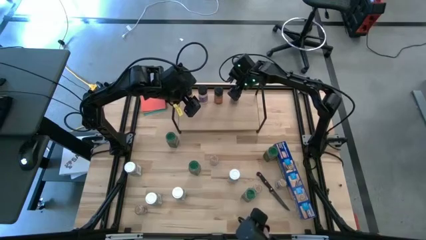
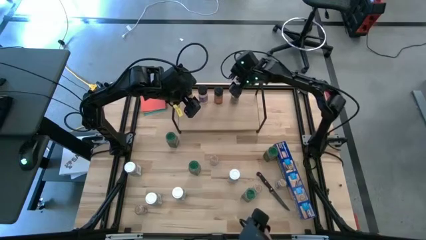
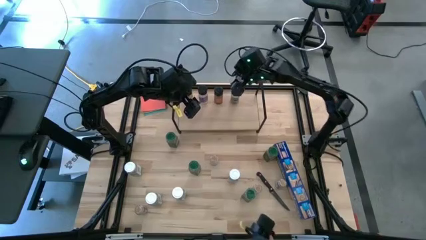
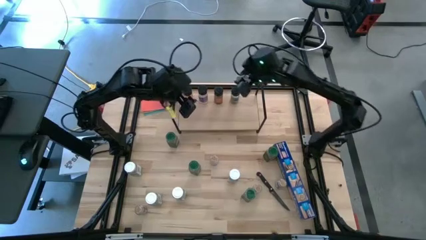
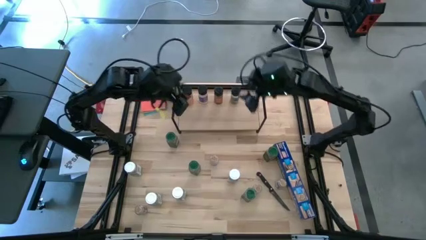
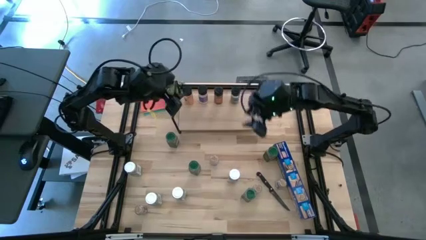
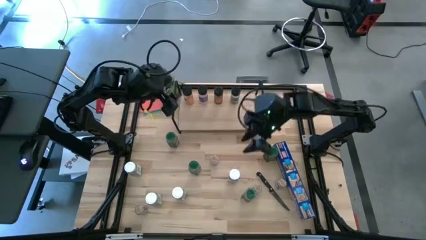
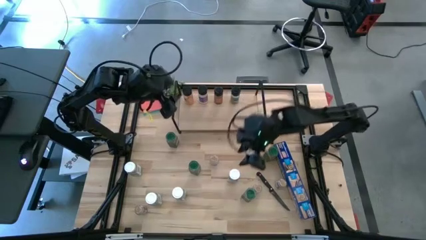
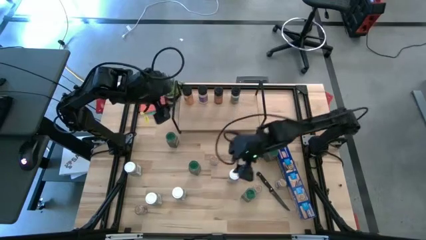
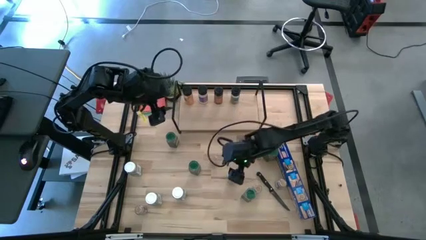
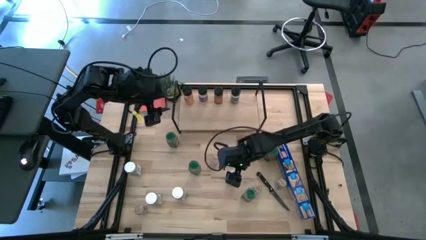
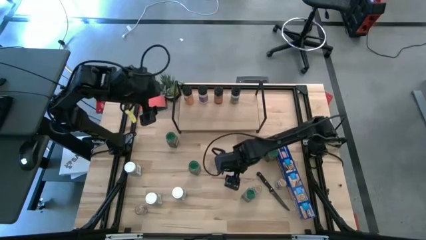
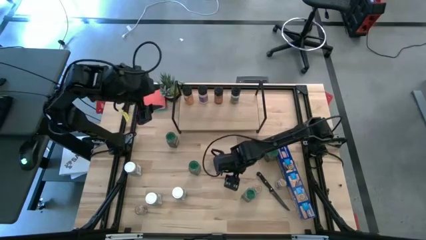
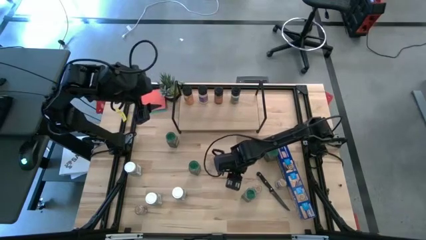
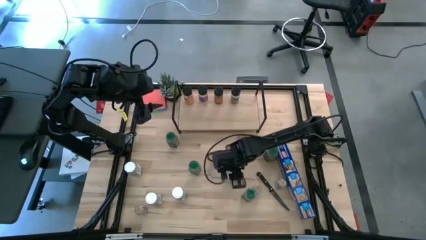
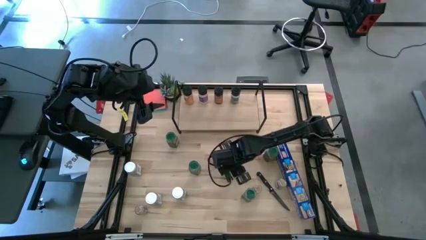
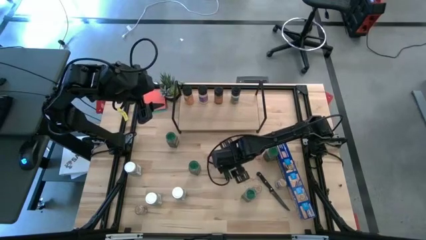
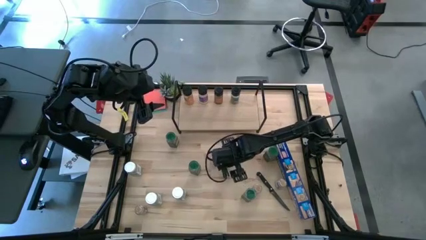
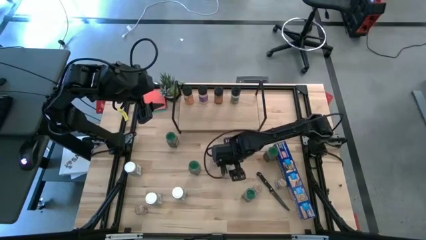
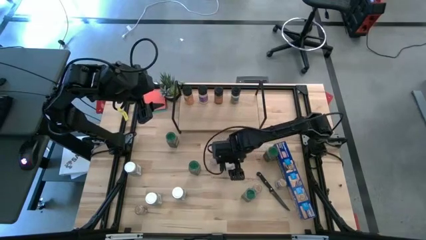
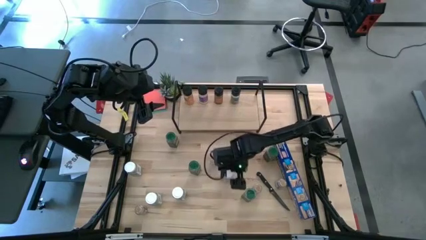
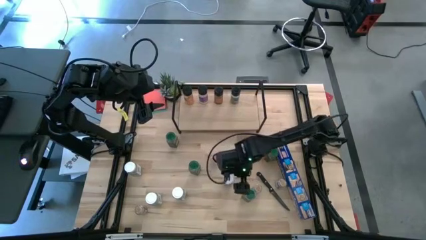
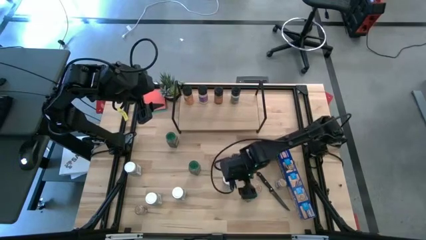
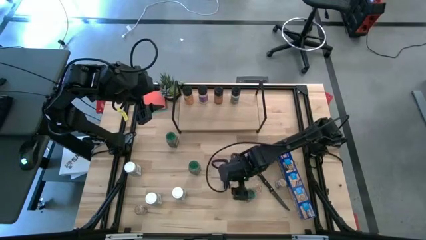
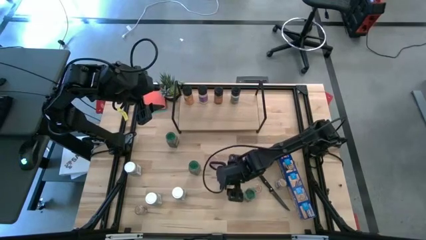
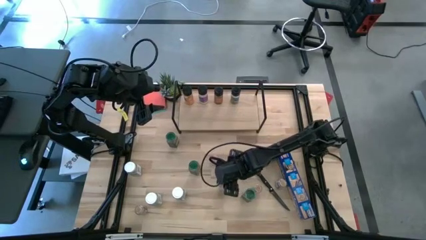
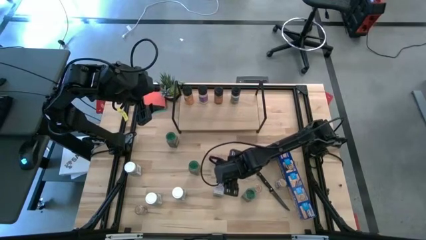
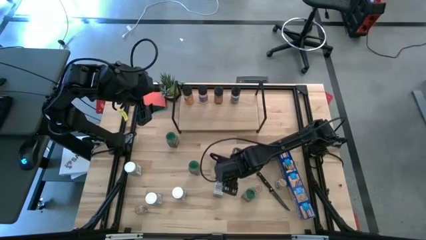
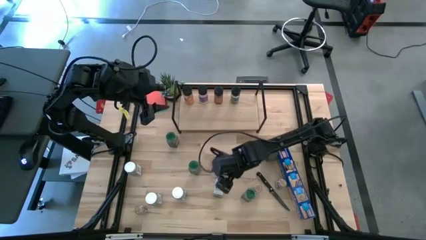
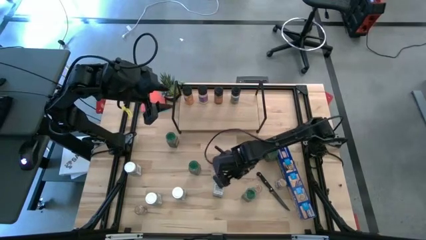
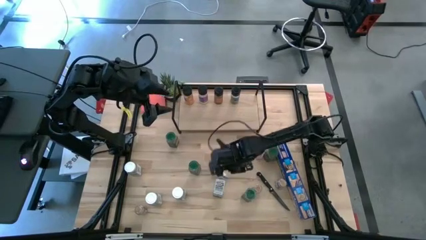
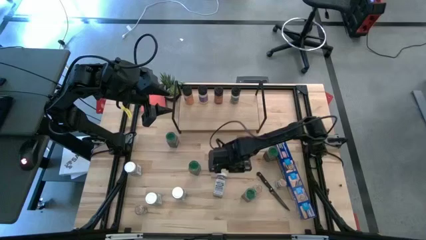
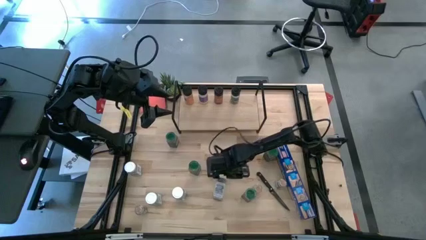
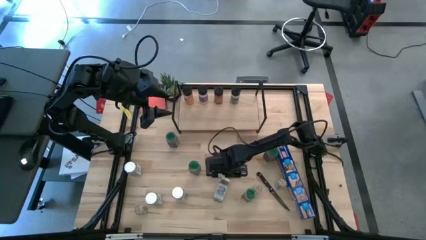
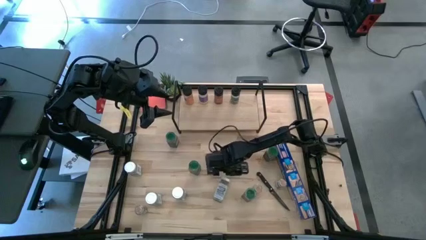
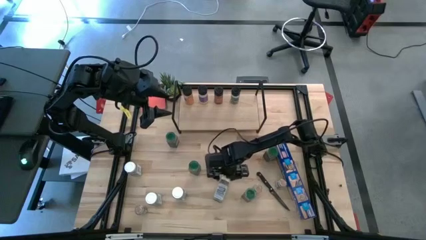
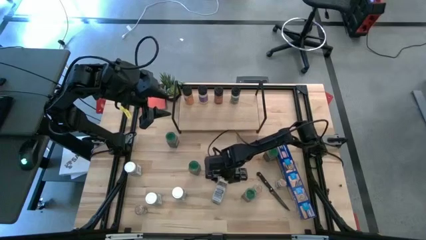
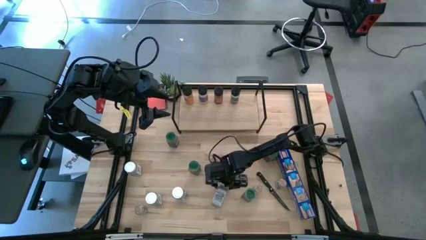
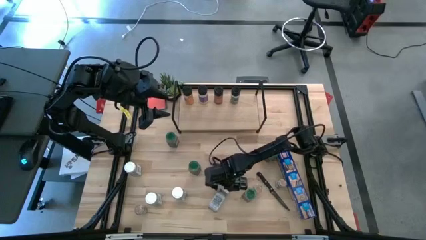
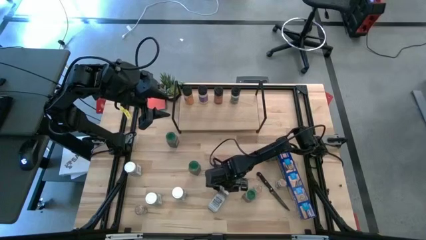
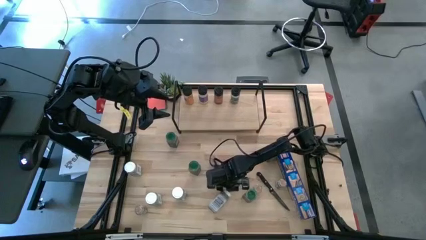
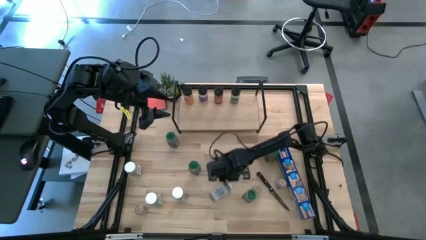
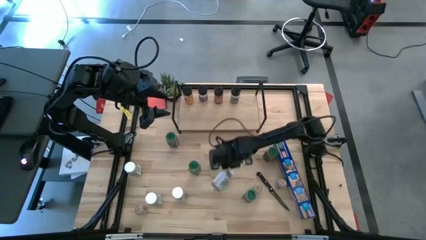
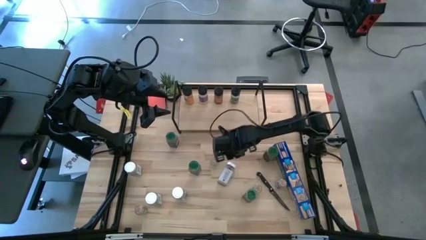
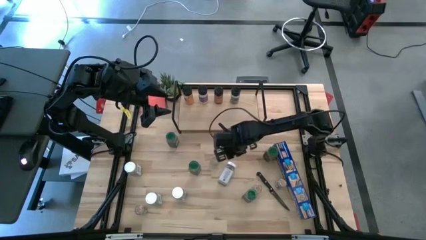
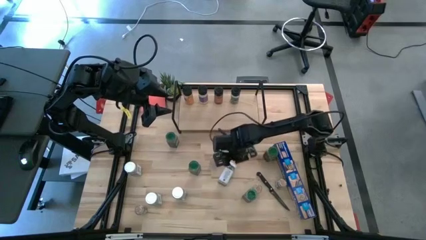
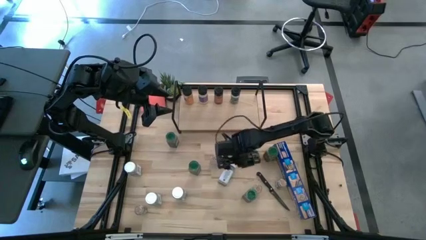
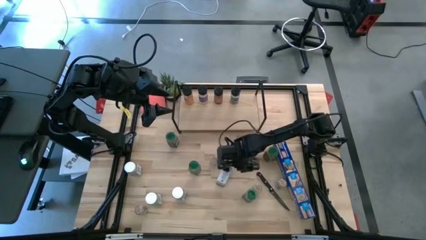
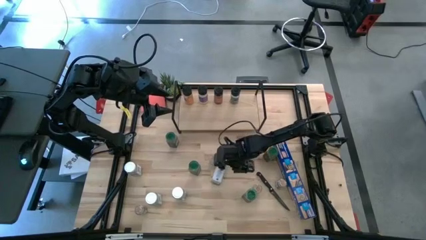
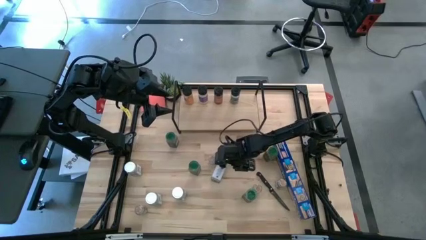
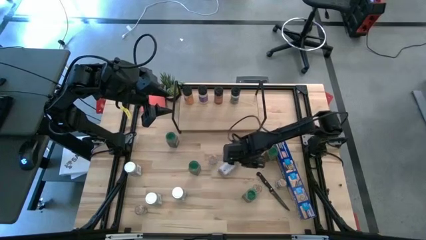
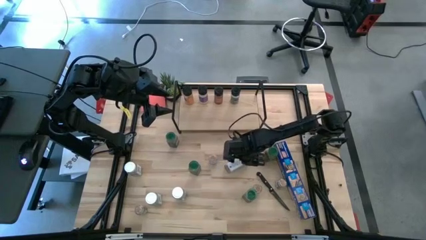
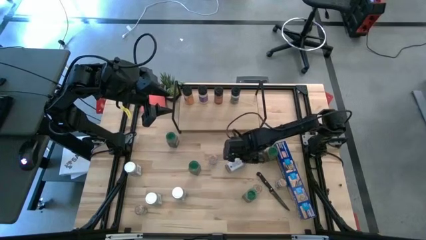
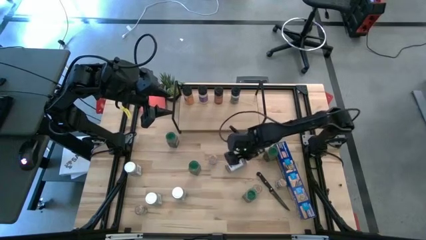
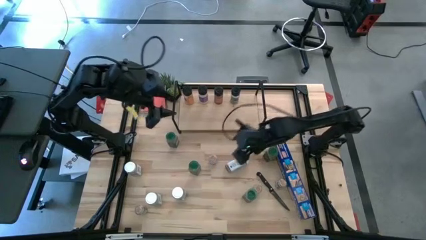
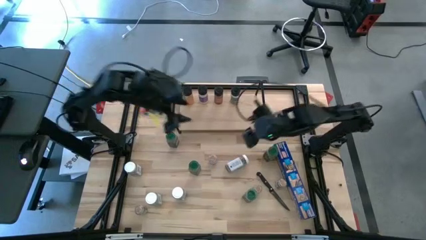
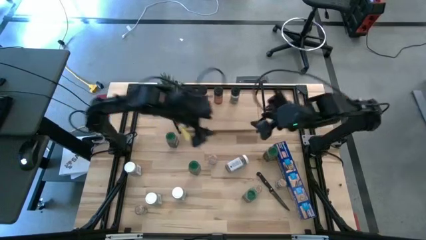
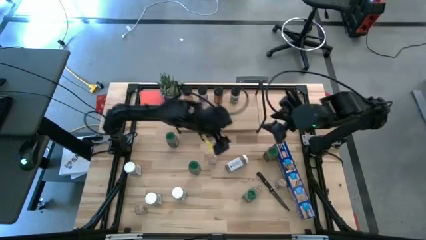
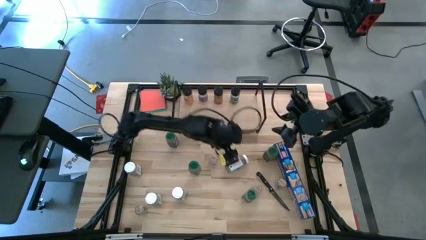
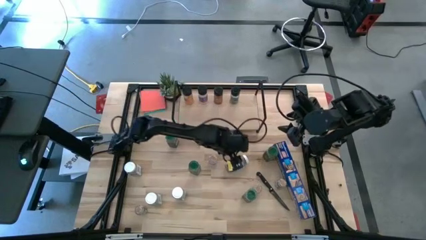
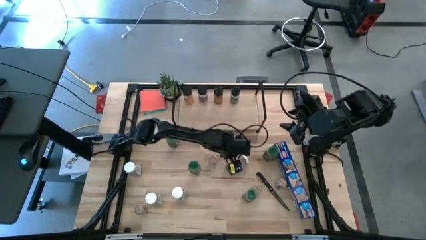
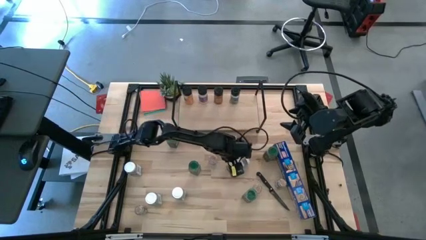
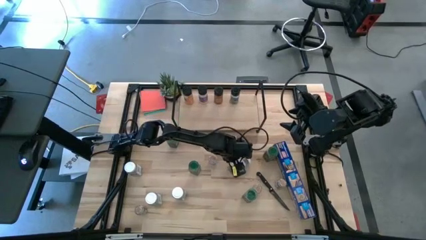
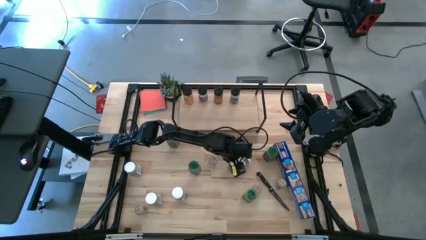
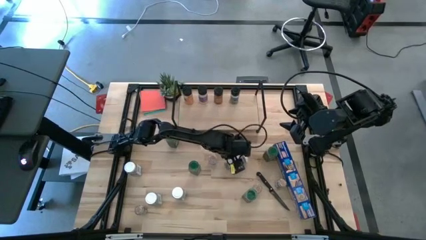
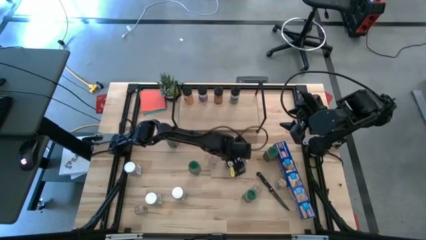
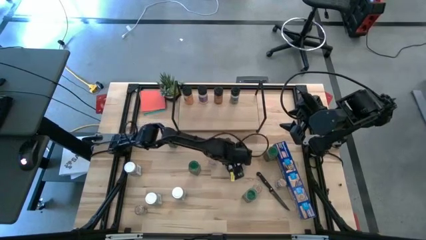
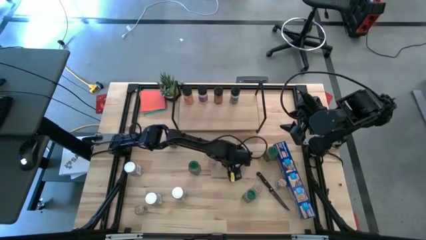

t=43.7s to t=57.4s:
Task: Shelf spices
Put the white seasoning bottle on the shelf aligned with the black seasoning bottle
